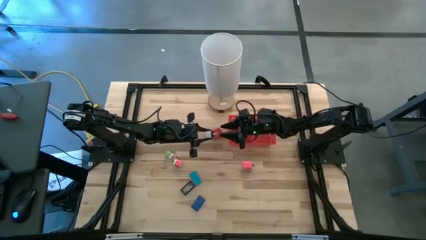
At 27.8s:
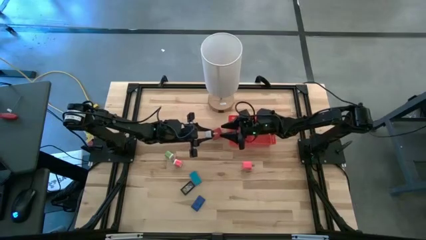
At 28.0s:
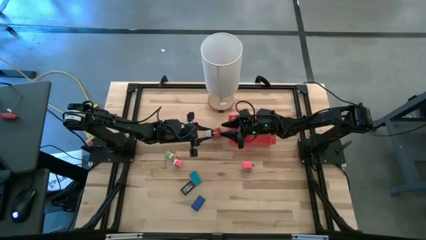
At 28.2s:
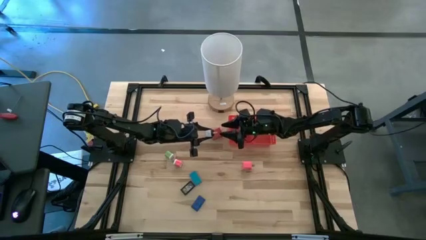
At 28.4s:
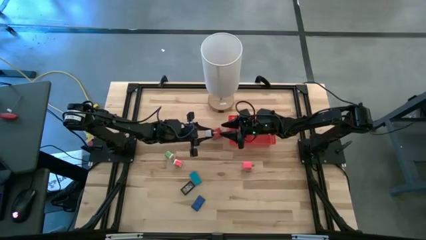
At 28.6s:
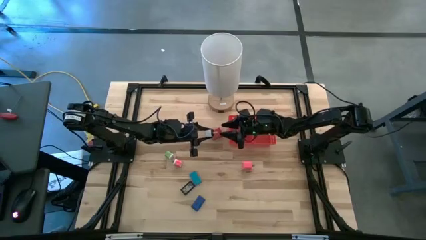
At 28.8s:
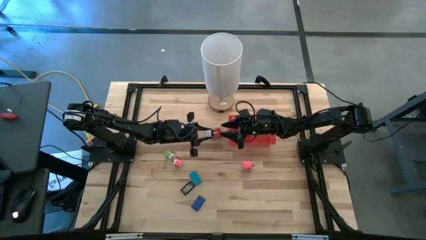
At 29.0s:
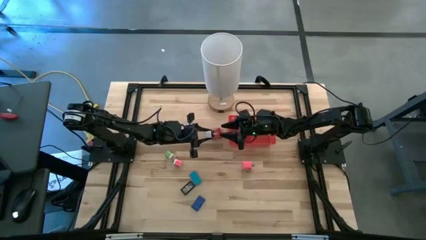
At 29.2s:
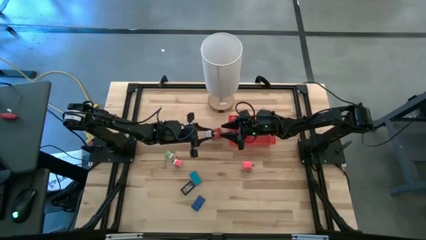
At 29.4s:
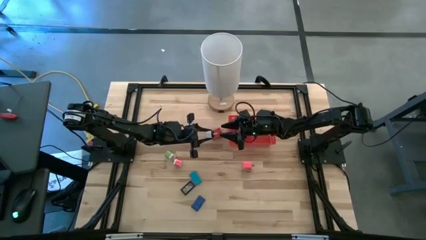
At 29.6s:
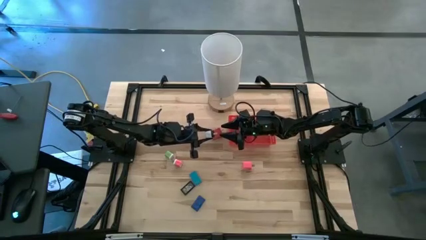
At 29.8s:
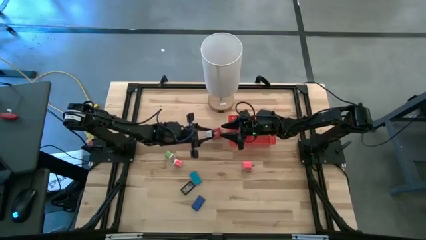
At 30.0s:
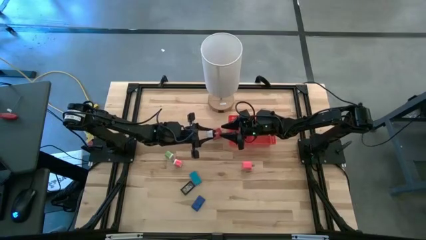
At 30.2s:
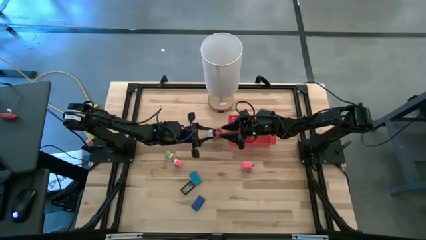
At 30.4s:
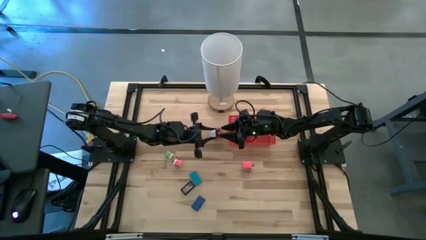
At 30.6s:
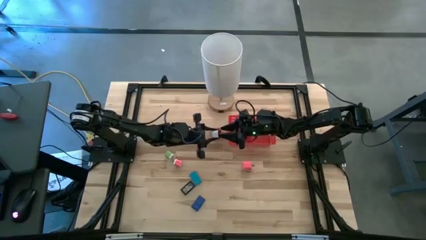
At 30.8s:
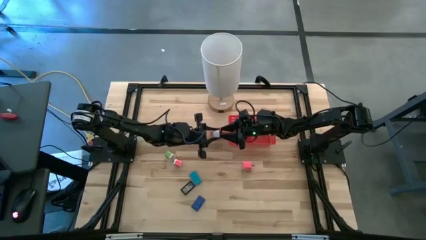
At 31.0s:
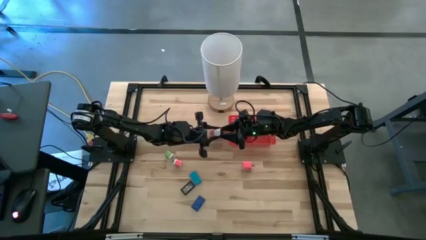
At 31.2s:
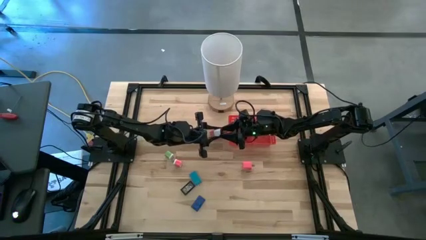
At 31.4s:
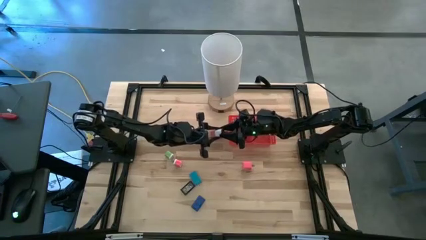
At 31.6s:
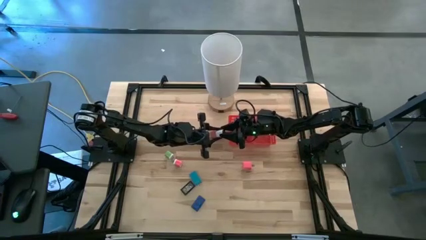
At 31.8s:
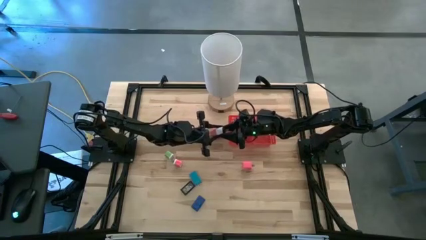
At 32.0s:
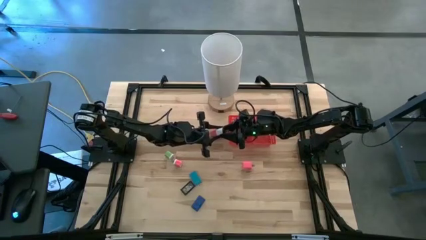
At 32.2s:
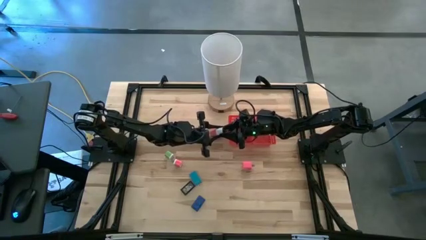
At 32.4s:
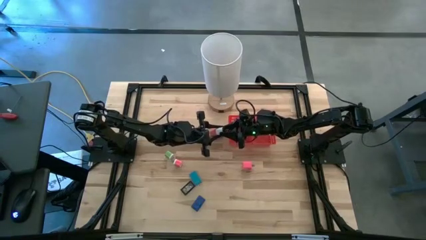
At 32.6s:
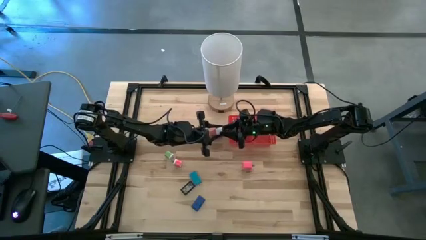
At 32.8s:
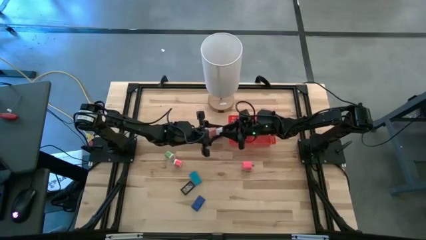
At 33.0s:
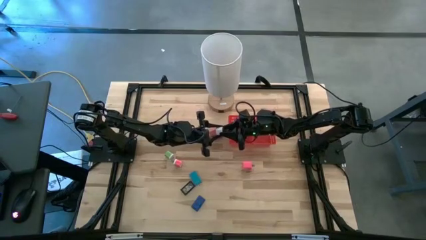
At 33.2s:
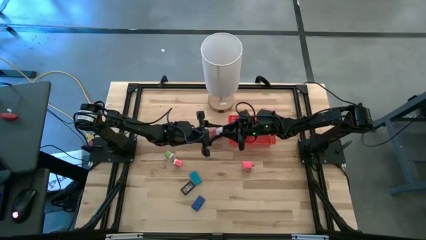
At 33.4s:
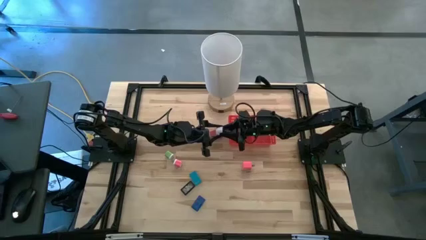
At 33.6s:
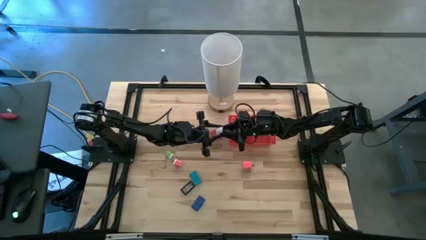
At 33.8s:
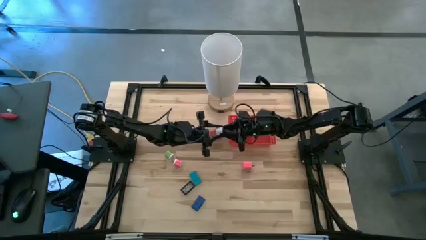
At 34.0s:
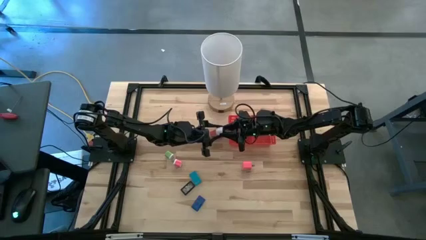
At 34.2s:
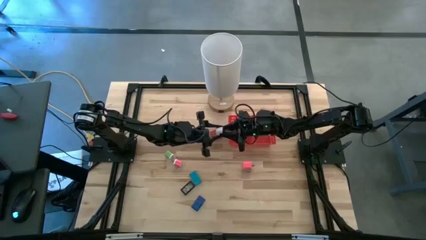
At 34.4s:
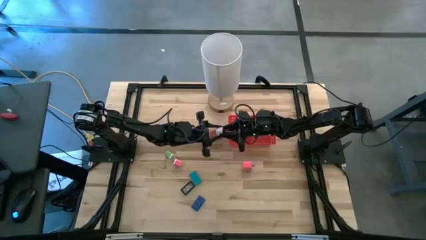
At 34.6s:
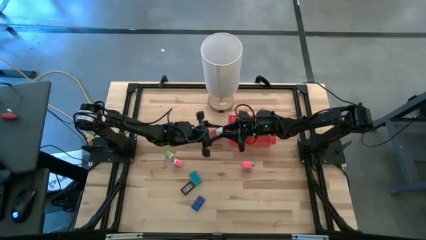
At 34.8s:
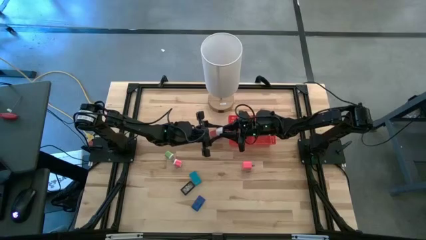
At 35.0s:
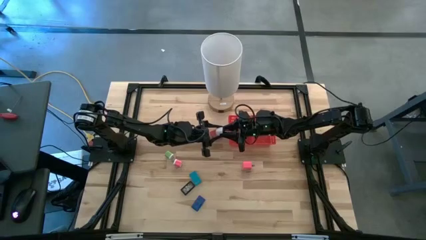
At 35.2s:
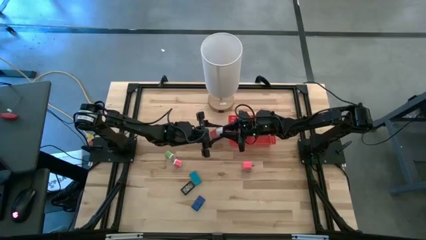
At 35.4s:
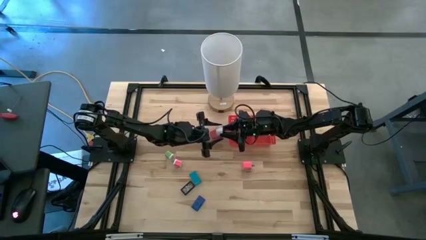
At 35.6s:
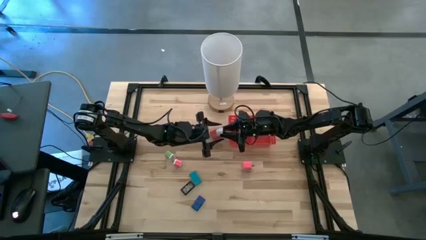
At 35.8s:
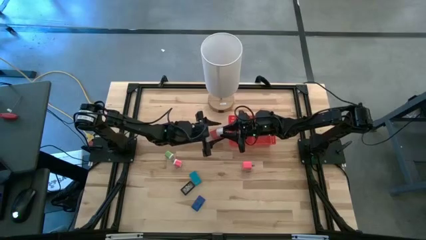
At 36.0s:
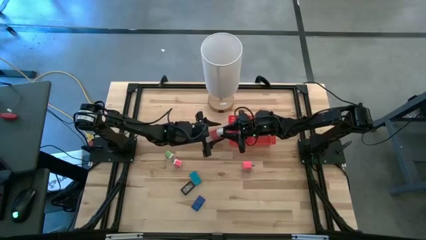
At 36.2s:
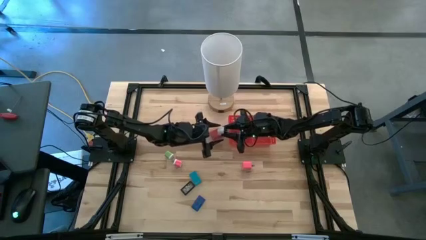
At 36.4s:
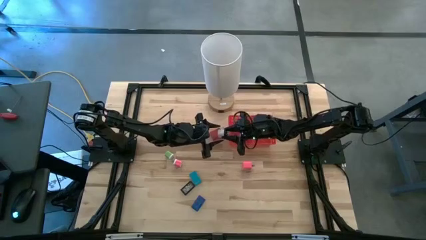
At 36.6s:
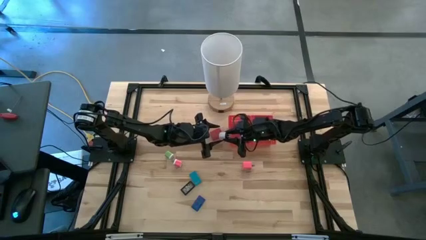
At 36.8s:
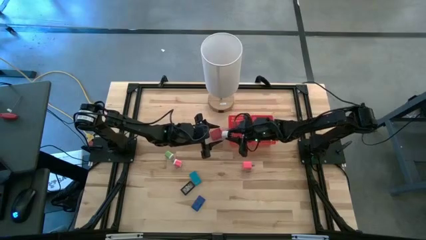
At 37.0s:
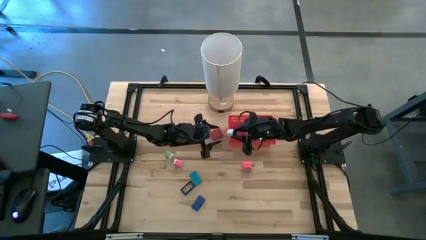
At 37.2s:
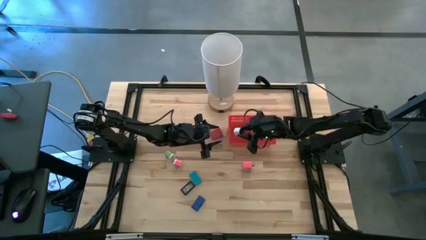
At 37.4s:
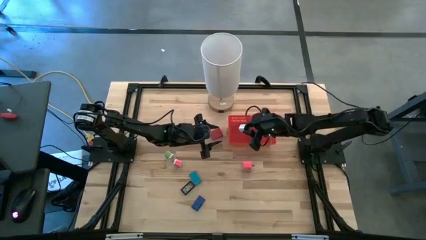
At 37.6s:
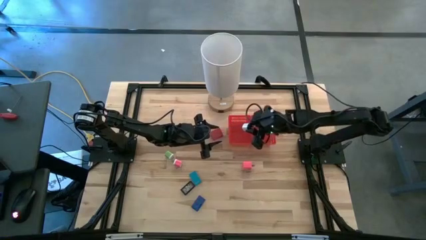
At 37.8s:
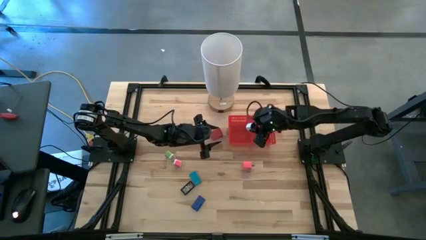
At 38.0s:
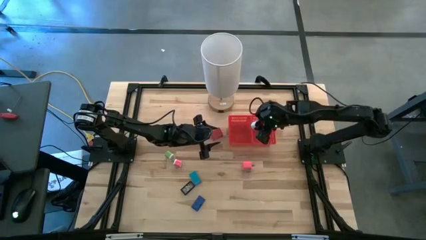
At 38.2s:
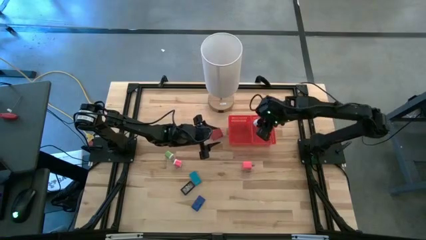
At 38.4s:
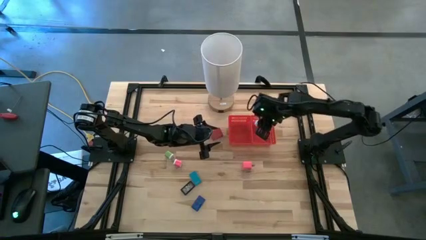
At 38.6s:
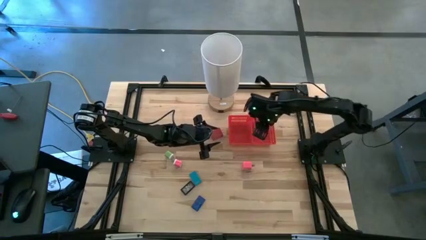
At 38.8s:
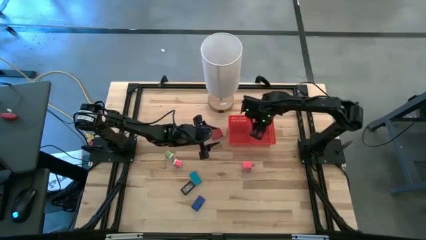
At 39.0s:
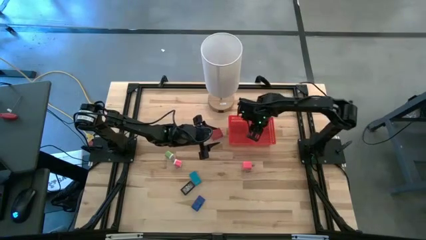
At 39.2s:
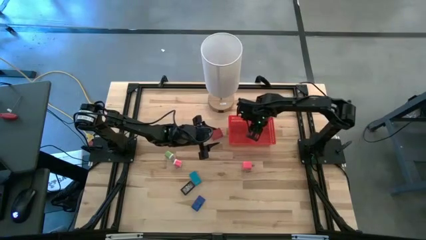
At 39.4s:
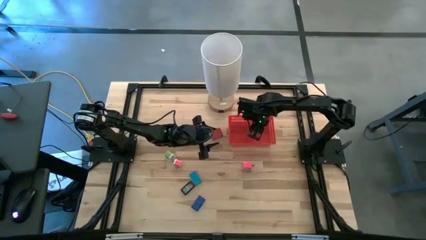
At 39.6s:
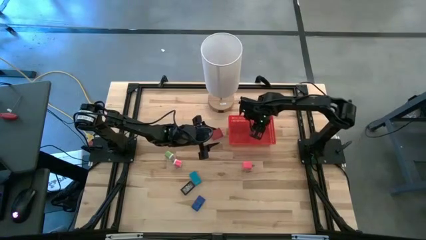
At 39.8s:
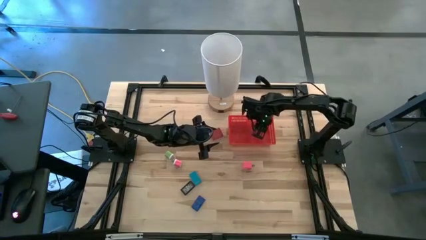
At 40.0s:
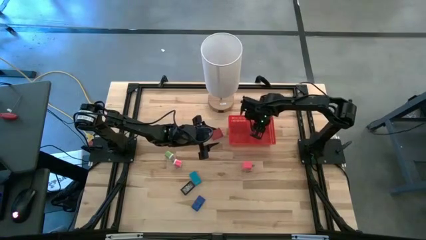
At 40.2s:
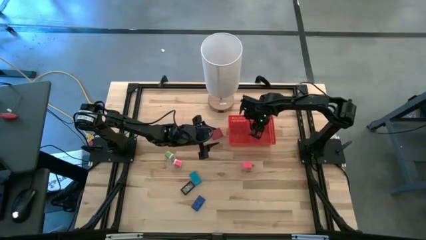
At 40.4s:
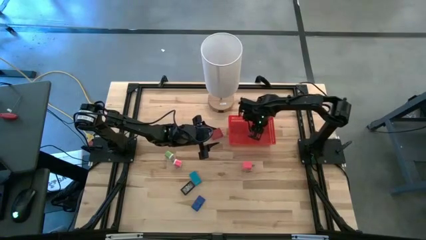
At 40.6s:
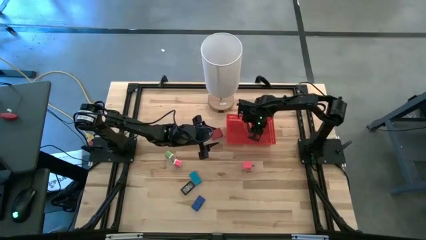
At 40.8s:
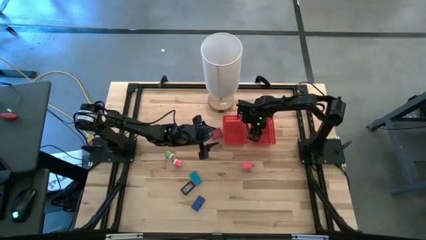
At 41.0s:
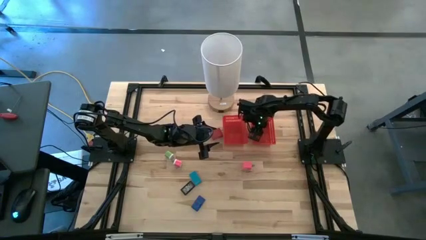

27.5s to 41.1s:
Task: Pick & Place Office items
Put the white charger adapter into the right red bin

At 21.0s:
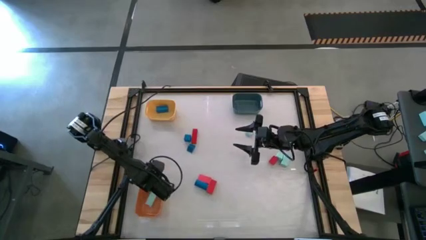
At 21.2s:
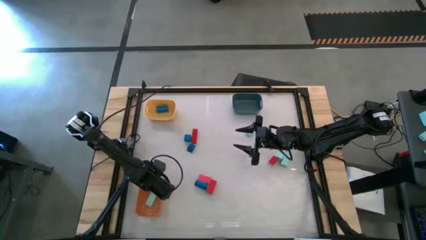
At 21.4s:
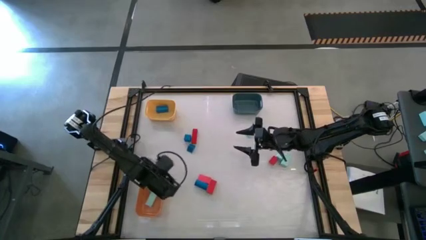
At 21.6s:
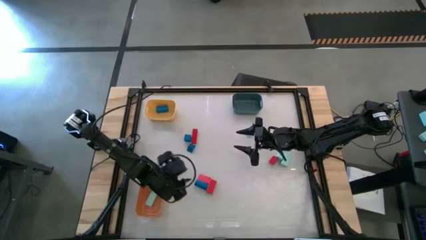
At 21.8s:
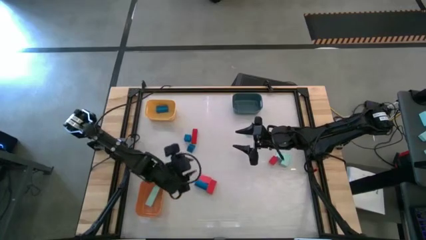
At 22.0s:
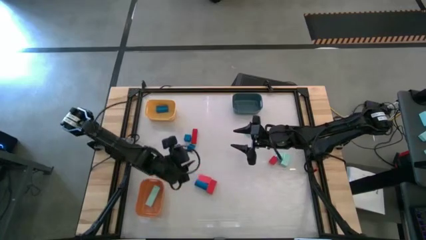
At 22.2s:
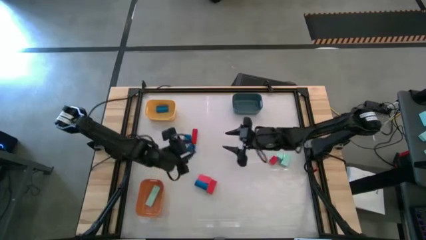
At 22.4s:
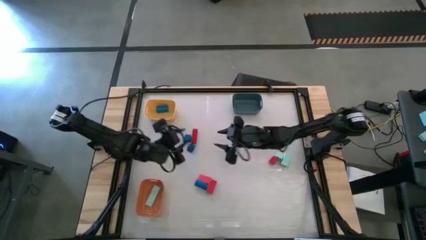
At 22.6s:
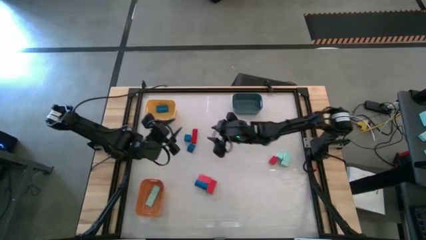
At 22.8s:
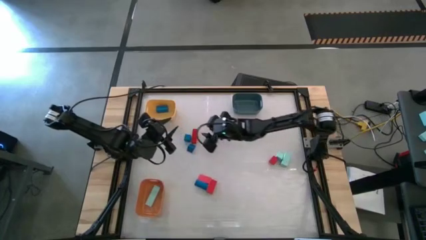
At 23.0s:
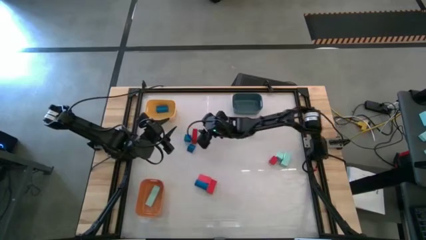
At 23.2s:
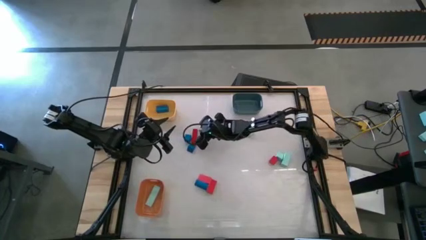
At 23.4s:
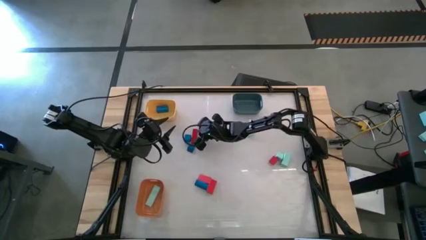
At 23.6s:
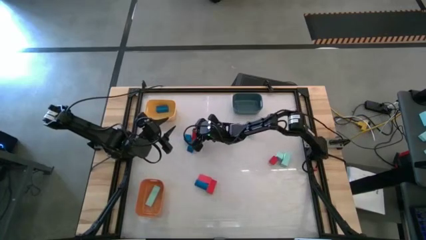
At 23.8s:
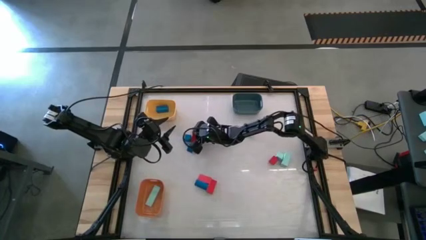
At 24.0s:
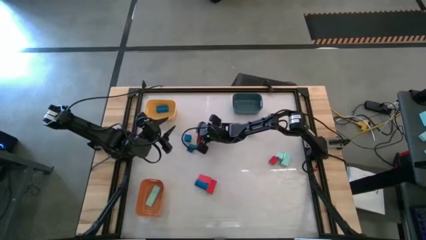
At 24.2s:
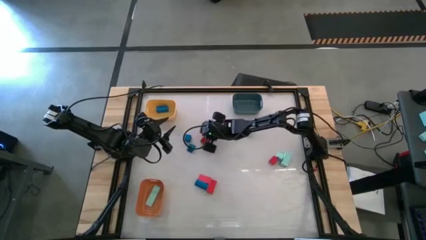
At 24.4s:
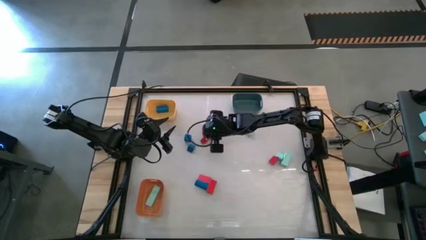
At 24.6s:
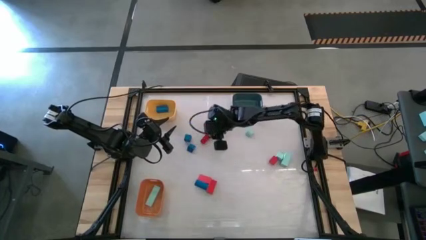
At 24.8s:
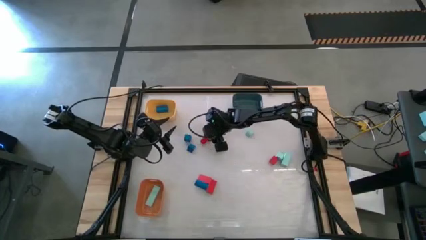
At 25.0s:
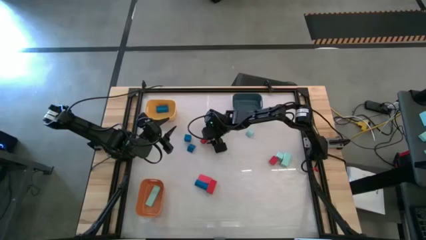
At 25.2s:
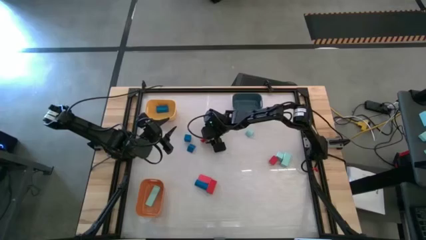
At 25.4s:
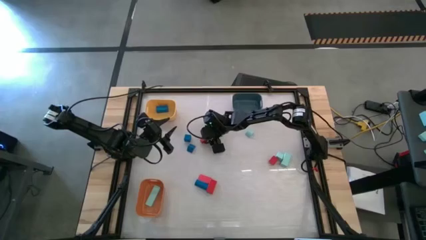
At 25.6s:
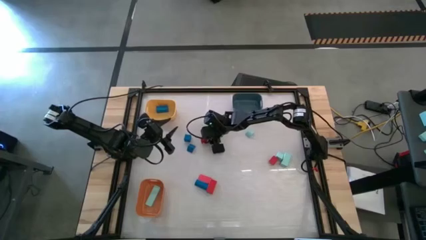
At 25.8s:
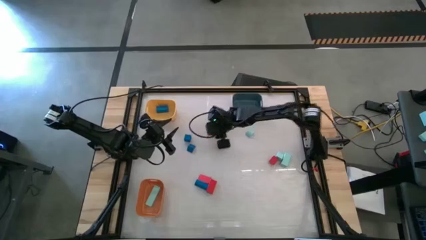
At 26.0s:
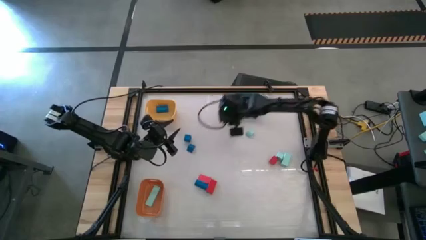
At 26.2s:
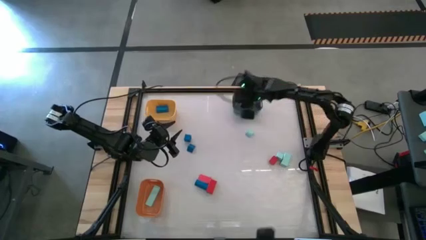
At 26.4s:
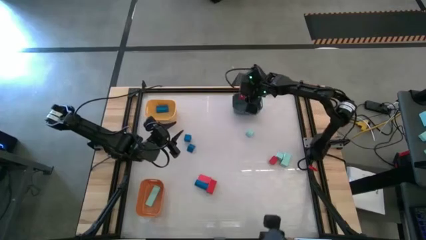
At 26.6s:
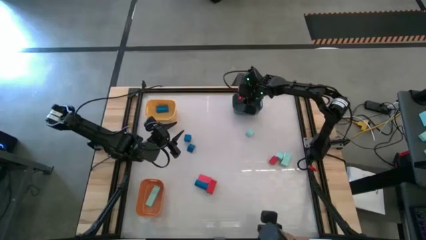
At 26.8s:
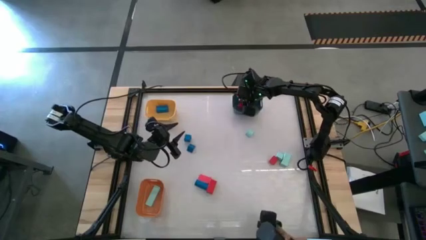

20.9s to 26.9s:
Task: Sort & place blocks by color
Put the top left red block into the blue bin
